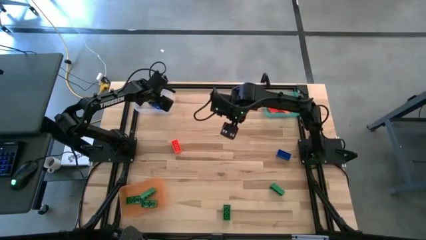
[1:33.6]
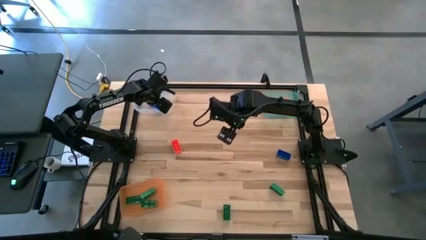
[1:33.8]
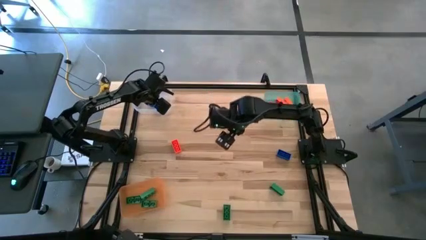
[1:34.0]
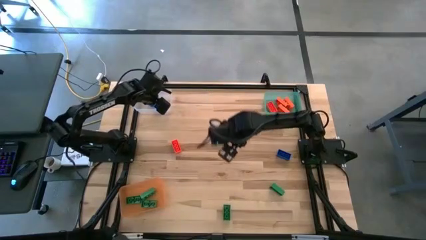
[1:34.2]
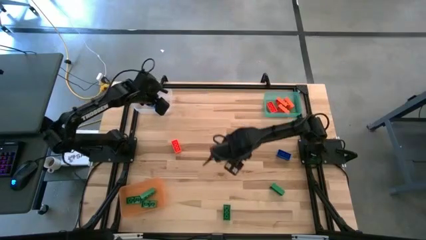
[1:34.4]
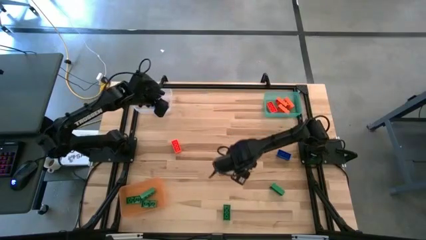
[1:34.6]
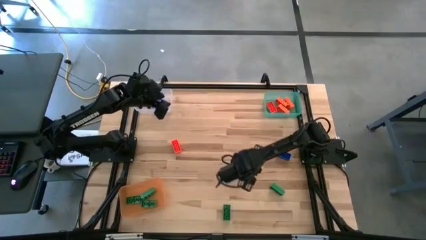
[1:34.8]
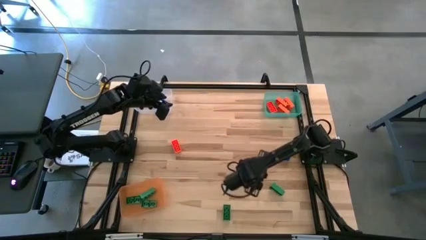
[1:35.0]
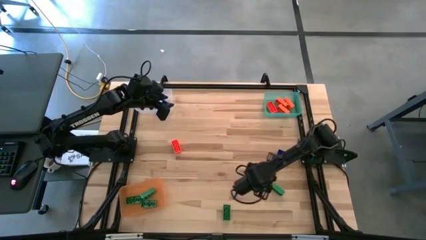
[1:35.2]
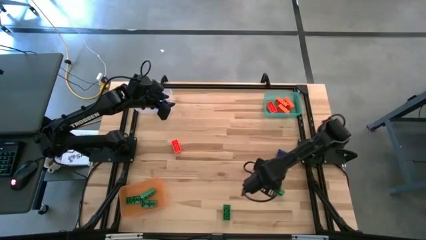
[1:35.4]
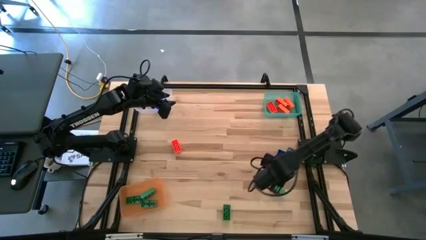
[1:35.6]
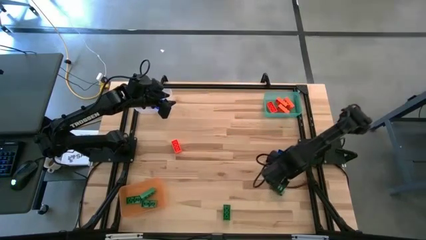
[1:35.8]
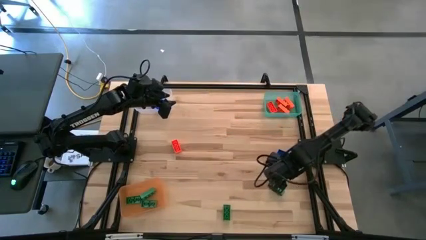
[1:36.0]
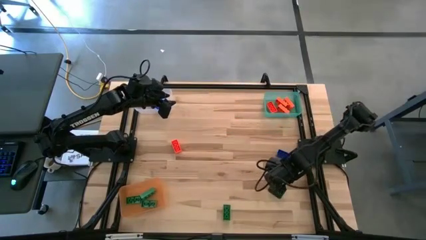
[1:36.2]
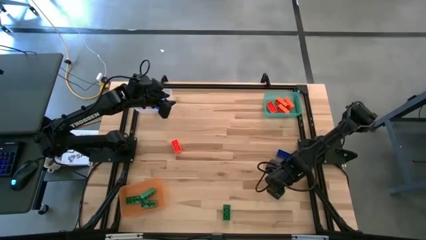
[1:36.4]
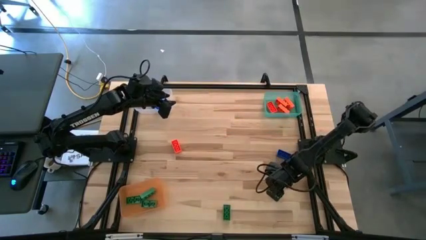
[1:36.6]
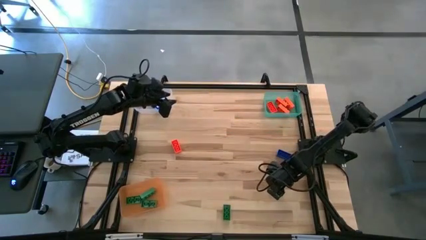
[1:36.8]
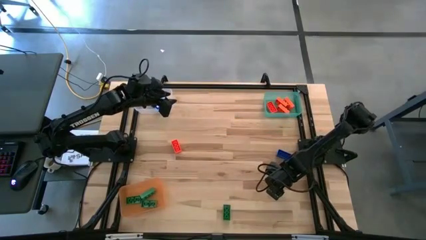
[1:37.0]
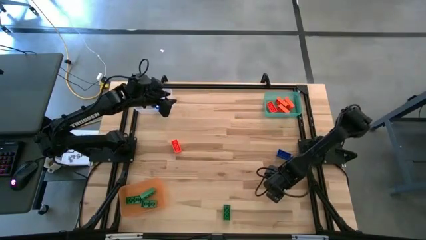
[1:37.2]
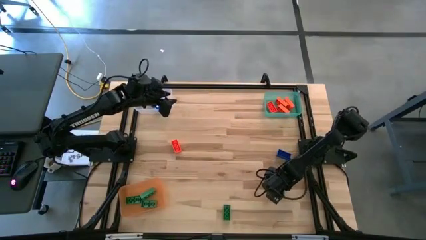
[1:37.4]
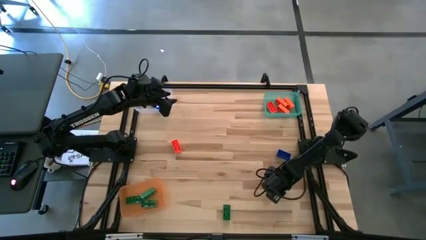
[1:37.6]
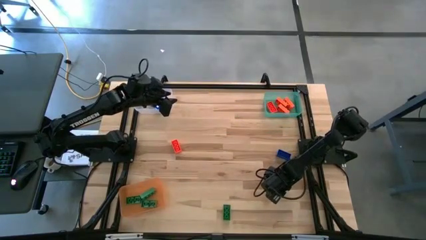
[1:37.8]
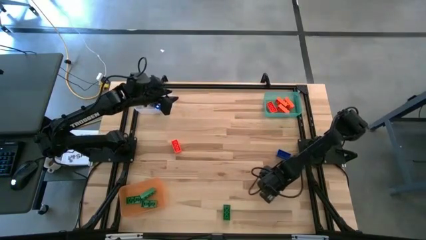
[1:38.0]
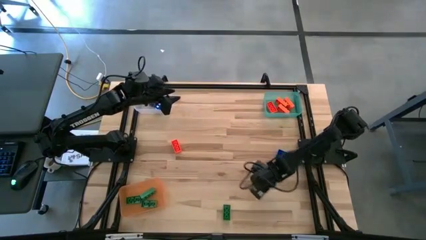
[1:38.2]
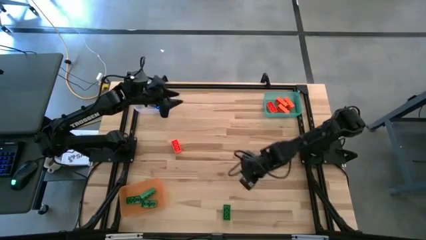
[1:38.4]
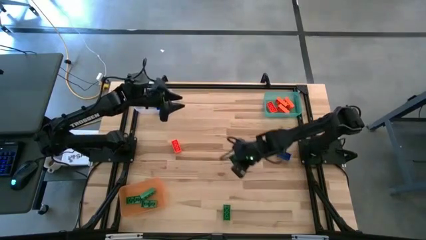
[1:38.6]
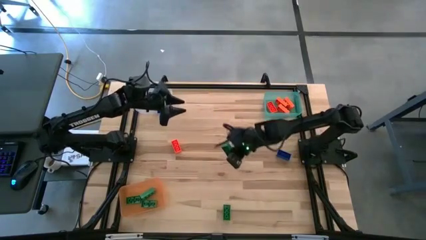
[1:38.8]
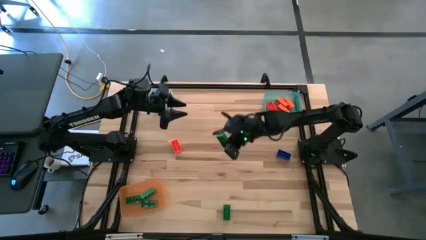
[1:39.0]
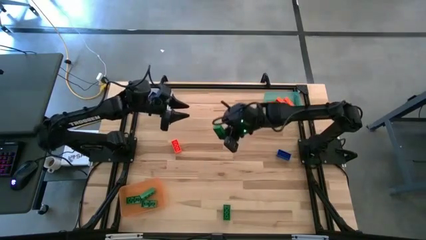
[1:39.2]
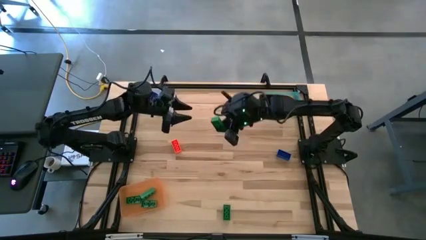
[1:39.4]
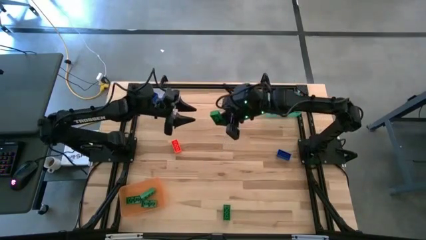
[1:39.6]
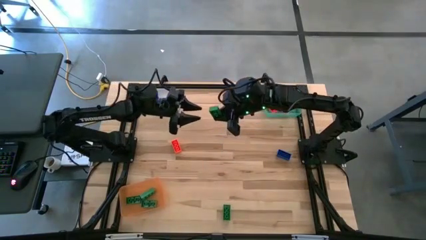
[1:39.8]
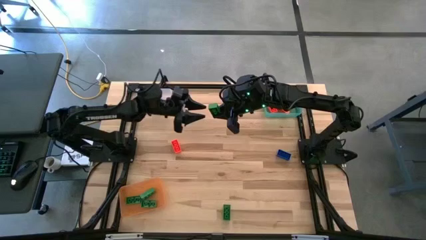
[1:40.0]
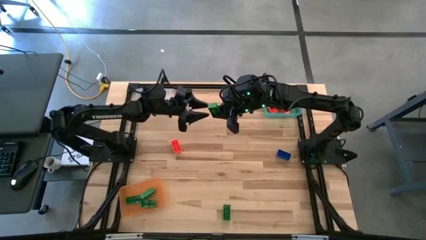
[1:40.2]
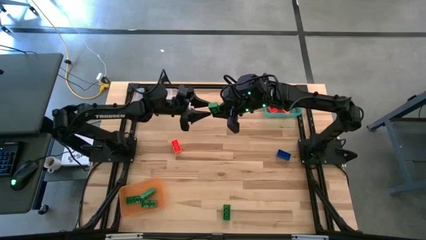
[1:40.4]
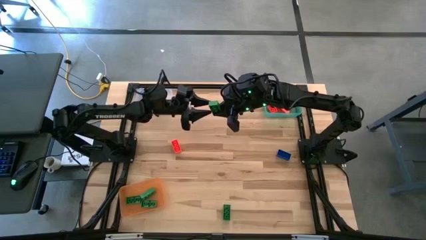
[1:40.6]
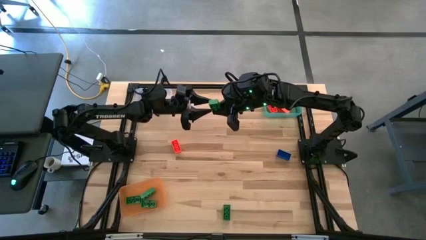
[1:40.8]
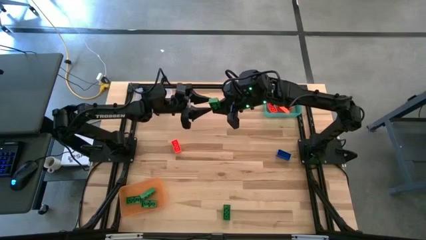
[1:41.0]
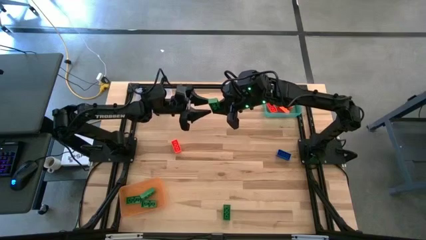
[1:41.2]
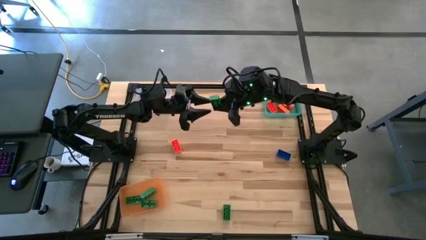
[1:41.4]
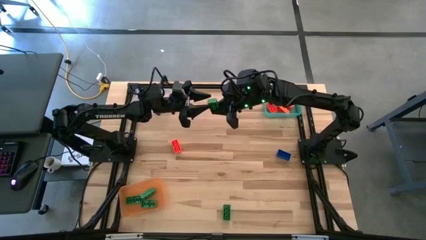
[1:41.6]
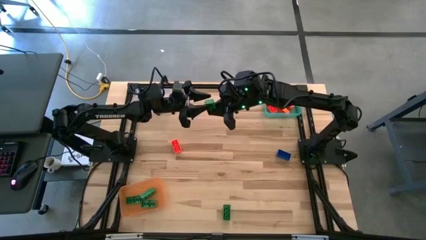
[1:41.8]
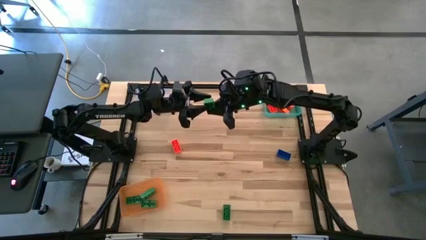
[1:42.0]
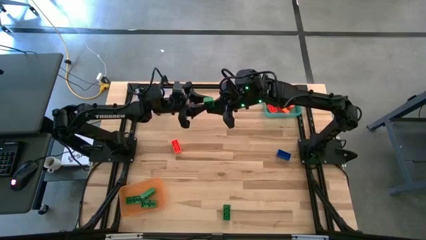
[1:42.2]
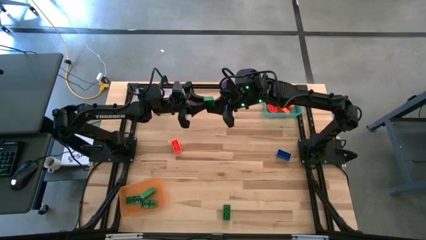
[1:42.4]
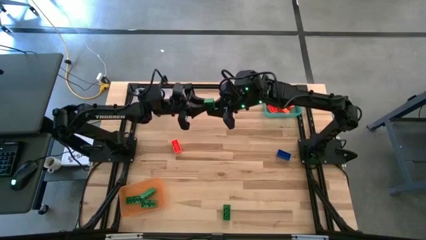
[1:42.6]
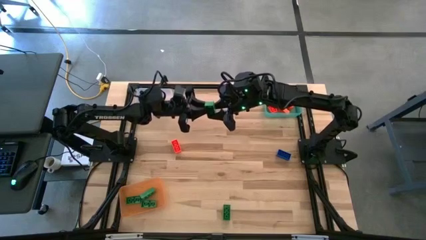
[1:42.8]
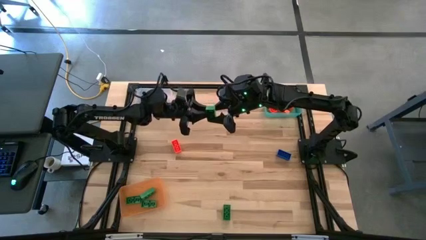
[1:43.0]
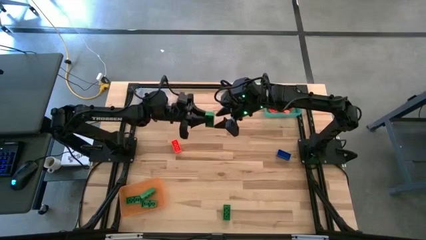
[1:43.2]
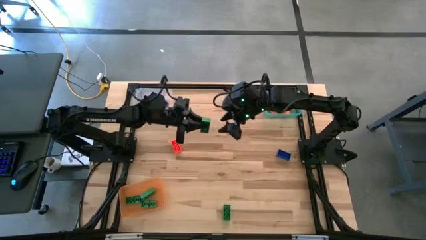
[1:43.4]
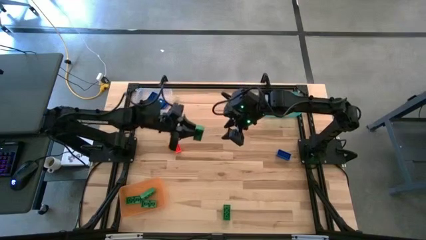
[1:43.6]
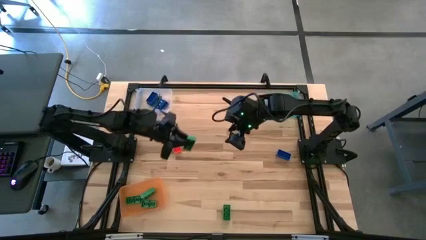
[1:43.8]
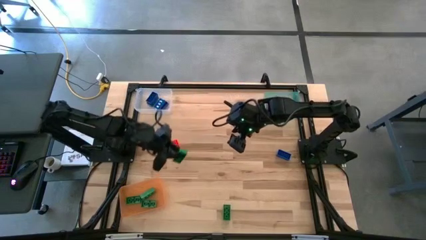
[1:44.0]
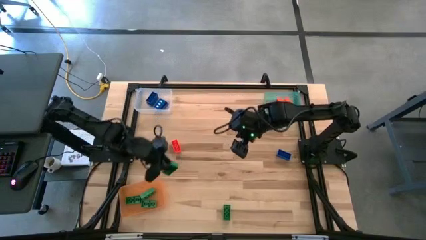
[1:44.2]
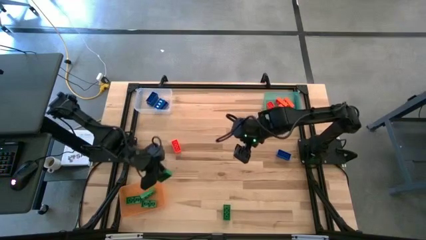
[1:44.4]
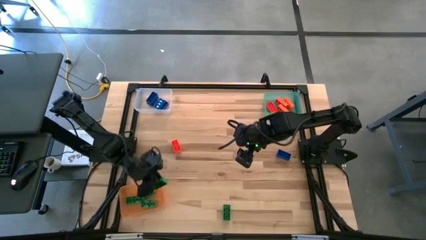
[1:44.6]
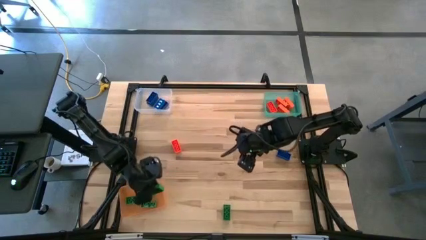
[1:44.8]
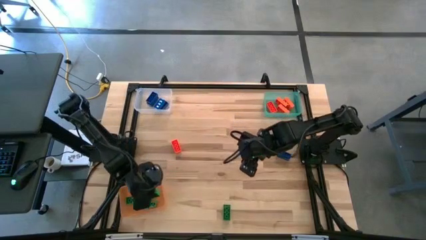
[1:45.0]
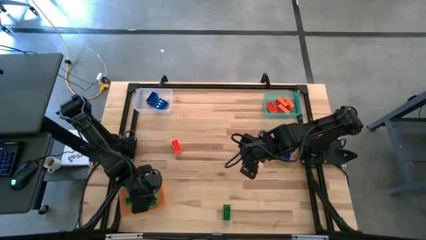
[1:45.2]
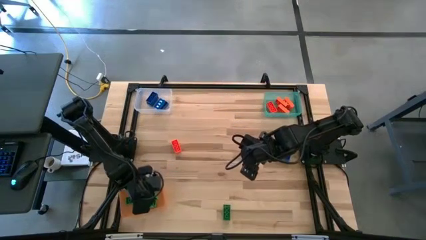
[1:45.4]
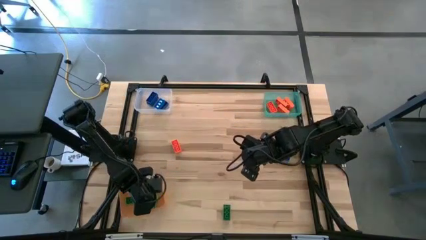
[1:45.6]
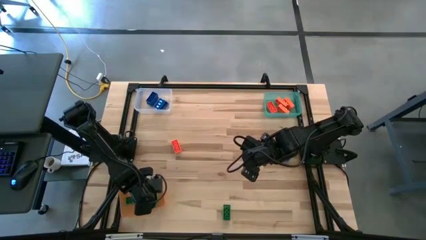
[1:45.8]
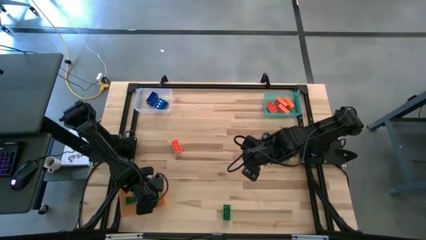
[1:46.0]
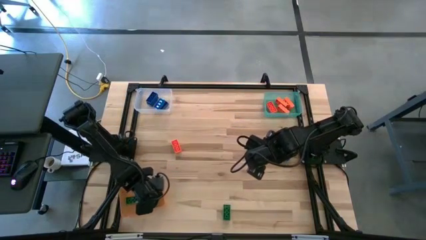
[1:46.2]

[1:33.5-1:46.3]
Task: Sort & place blocks by color
Put the right green game piece into the orange bin

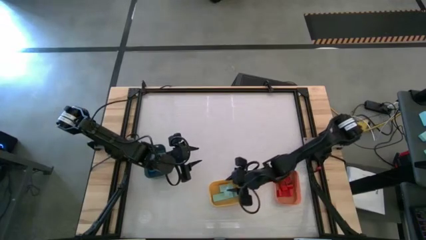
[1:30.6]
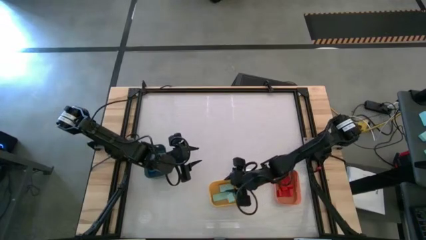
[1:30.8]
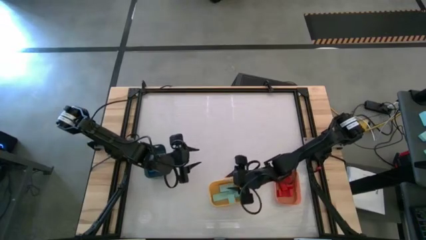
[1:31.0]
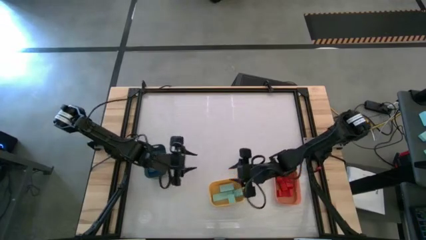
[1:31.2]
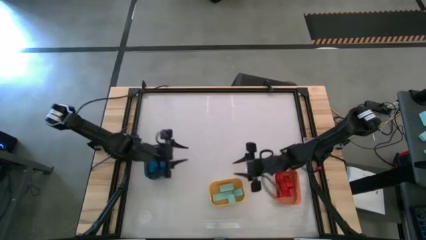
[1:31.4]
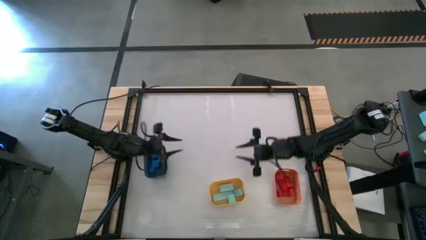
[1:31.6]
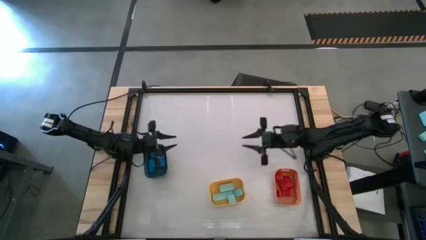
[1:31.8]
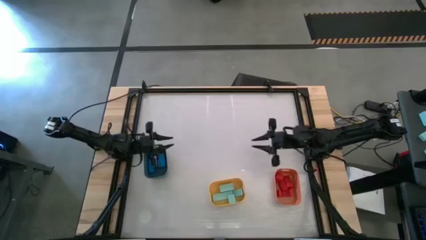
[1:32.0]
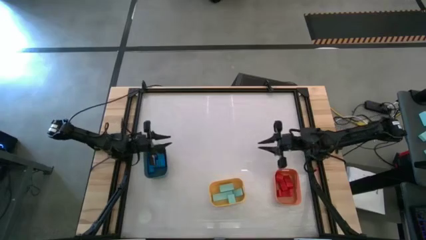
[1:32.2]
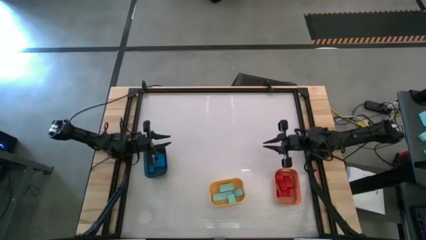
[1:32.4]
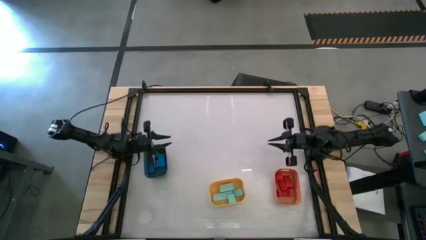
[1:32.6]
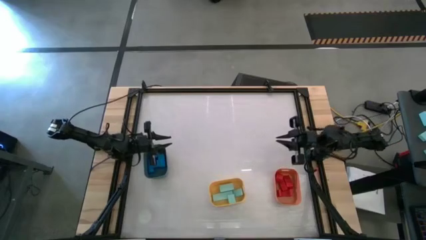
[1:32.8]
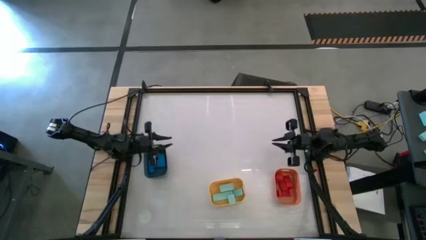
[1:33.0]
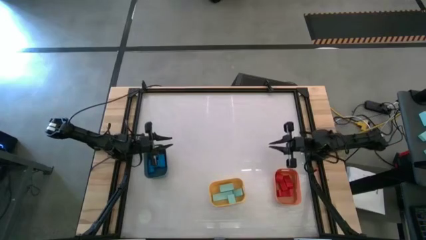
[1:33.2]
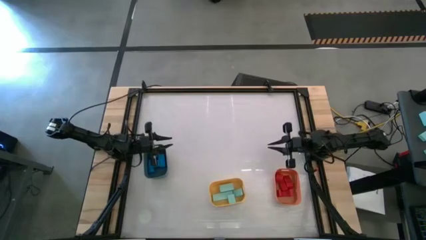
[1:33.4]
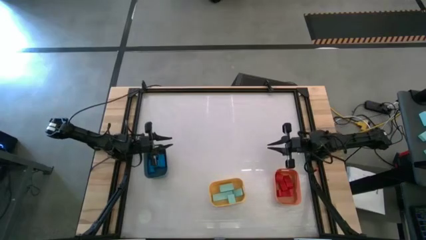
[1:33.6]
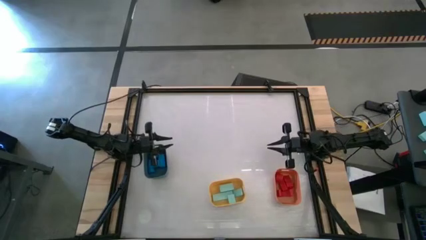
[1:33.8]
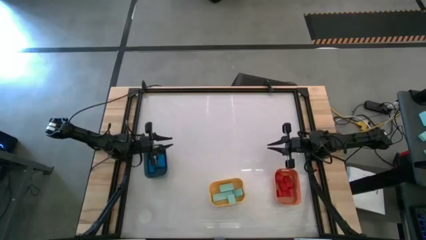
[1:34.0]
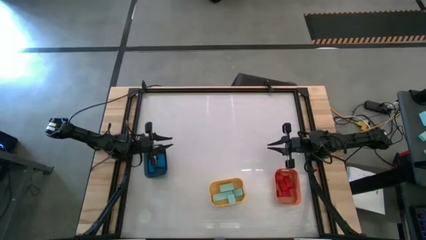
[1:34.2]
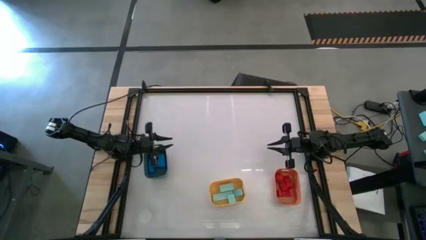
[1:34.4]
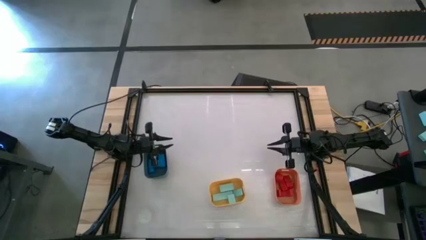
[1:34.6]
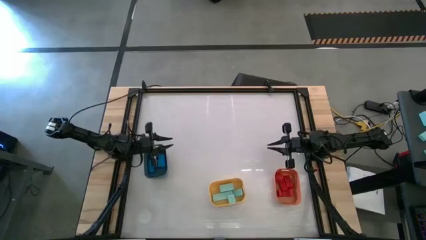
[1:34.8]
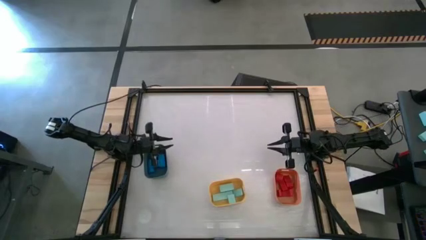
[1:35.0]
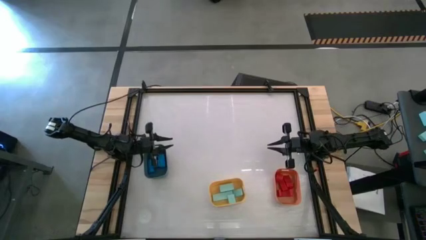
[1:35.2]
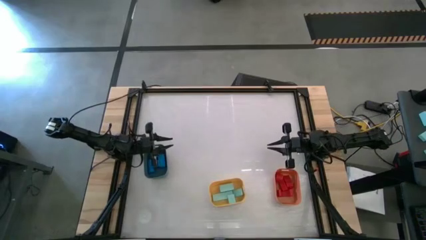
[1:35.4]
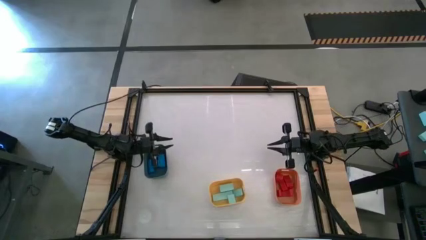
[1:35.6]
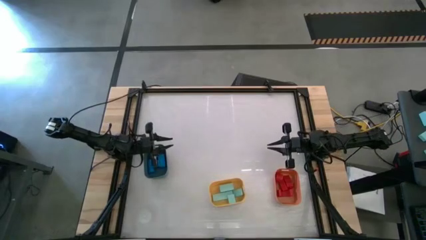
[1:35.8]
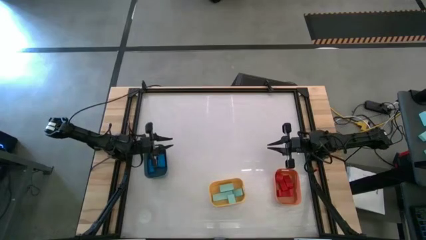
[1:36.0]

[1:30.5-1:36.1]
Task: Sort & place blocks by color
Return to Home Position
